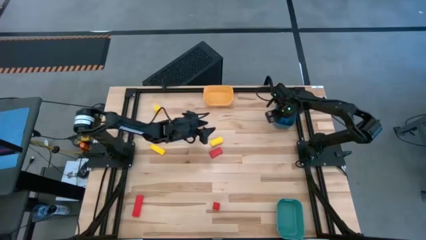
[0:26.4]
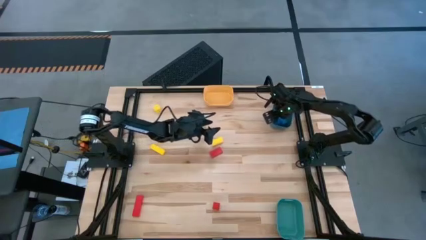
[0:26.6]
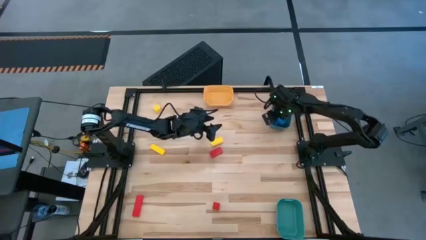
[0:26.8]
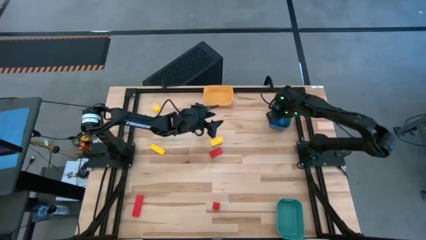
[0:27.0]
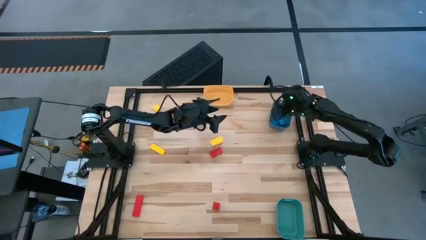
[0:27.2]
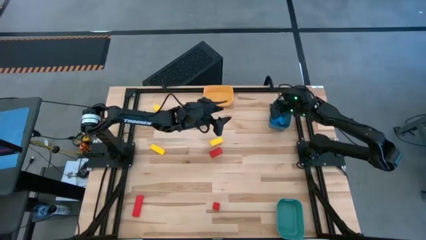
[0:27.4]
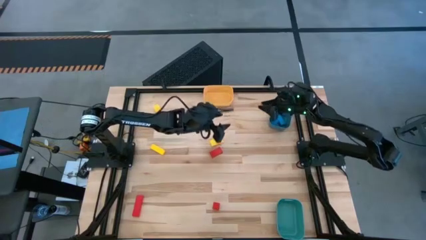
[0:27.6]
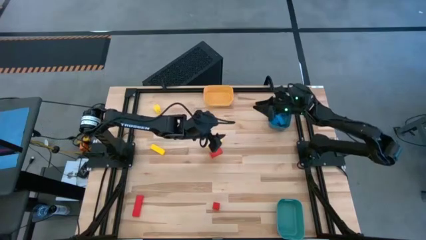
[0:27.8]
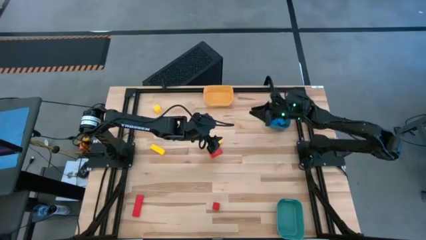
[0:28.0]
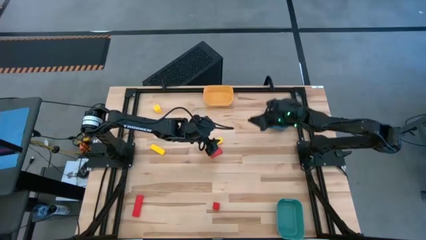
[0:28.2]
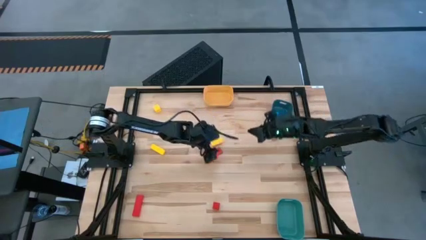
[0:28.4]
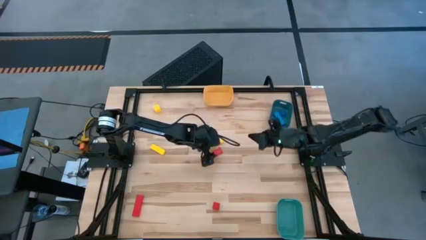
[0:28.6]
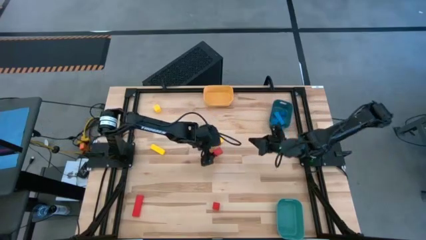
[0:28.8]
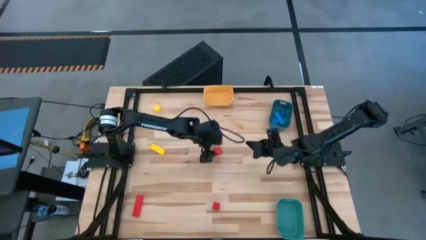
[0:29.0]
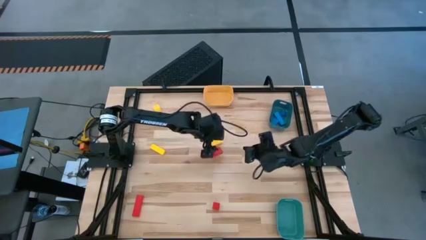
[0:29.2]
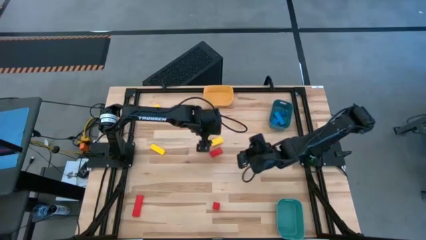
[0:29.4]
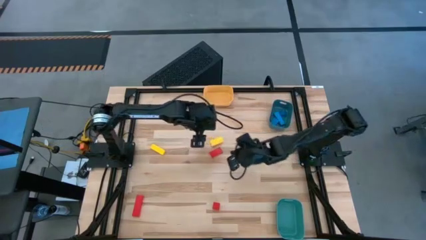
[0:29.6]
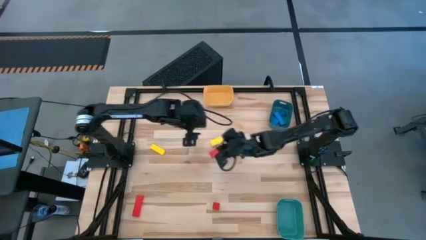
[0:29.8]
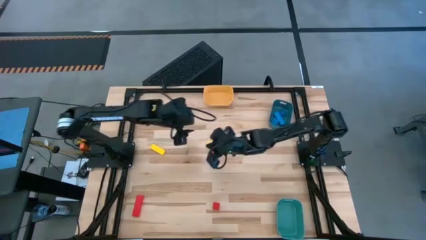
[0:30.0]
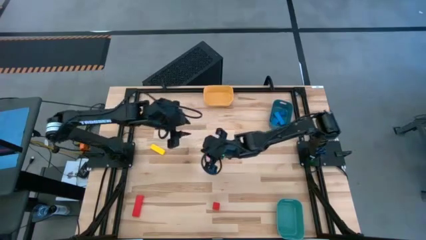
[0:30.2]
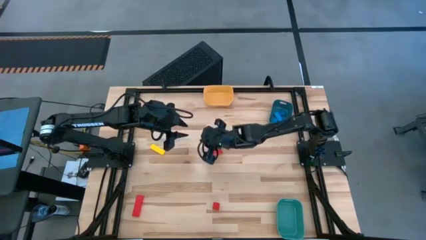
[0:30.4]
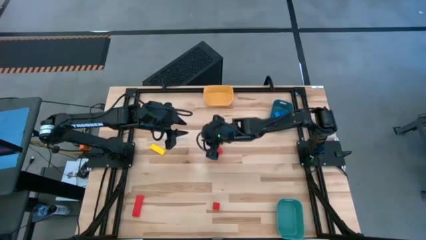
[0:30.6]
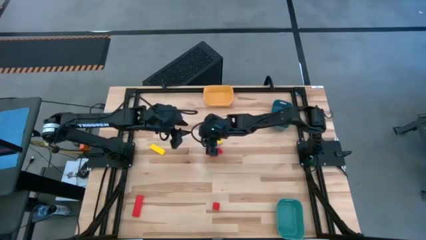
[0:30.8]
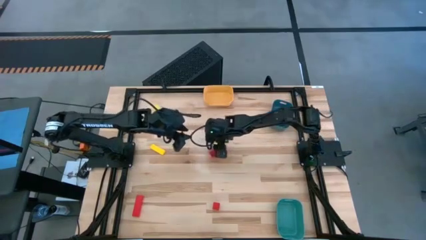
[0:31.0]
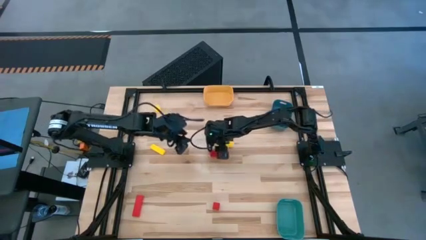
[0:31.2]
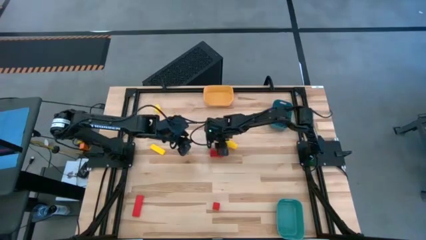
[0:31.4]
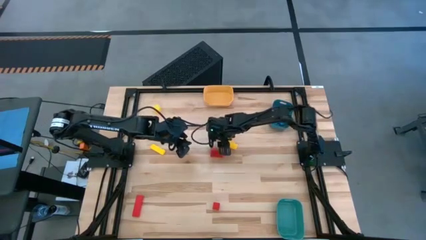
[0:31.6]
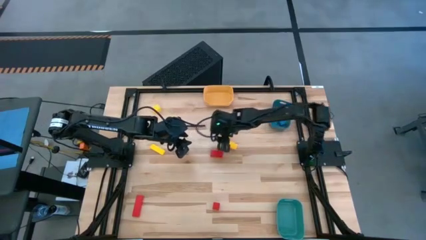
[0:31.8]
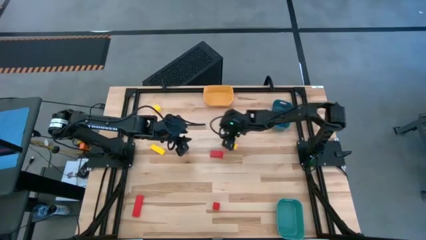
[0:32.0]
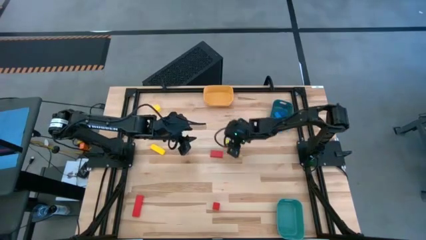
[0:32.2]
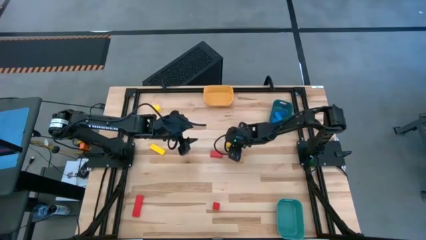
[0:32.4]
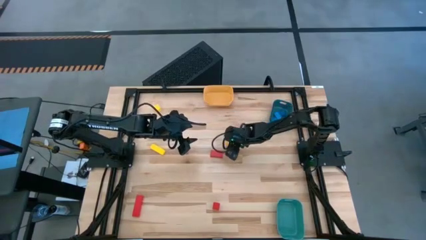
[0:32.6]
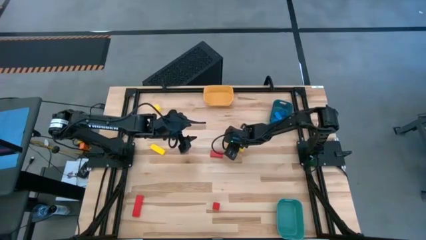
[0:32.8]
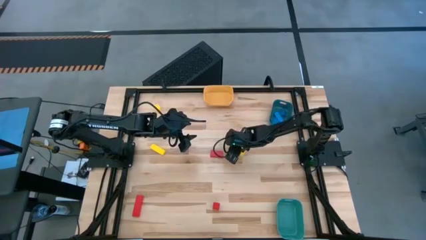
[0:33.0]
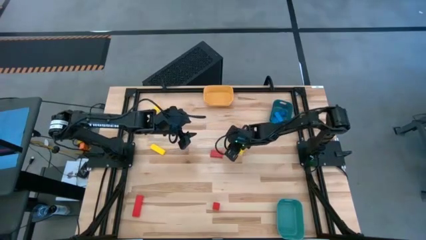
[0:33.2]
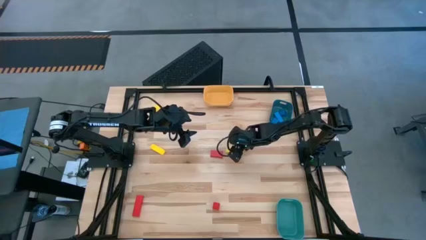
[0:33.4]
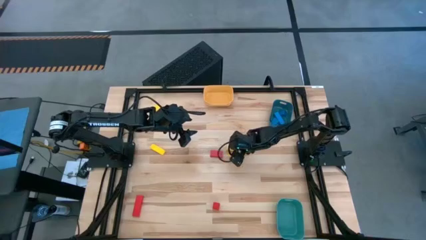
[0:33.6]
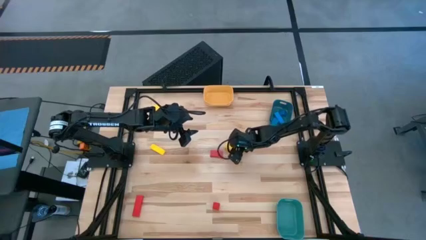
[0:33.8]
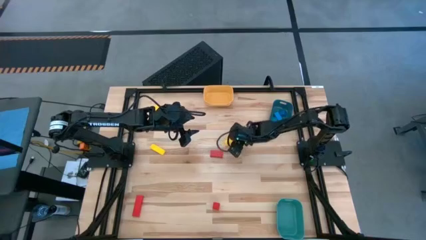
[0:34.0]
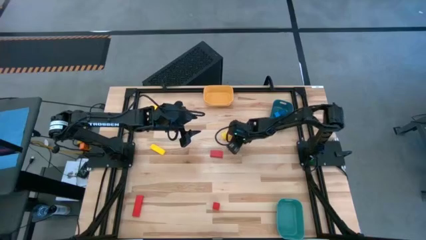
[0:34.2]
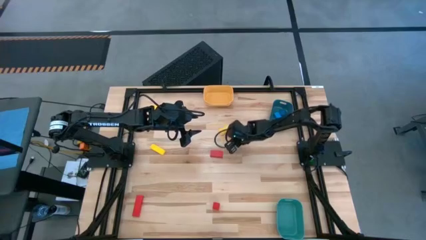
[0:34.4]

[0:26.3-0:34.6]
Task: Sort & place blocks by color
Put the right yellow block into the yellow bin

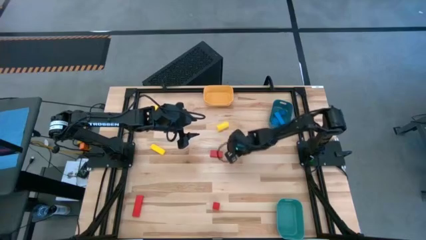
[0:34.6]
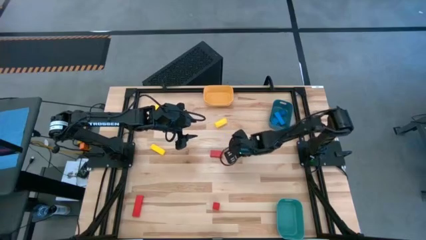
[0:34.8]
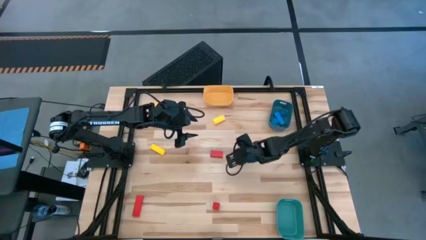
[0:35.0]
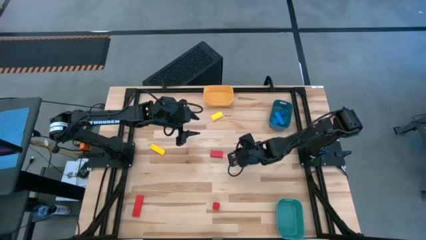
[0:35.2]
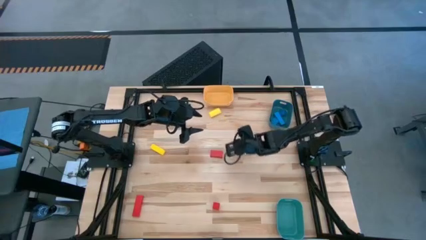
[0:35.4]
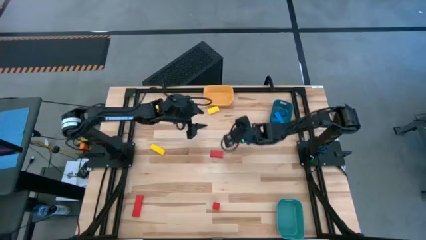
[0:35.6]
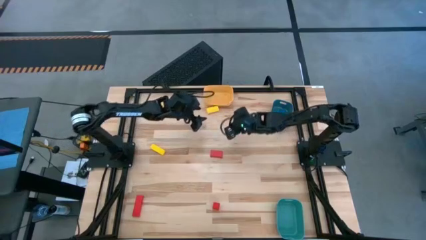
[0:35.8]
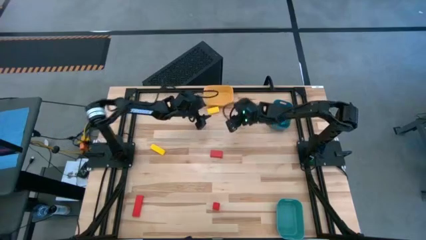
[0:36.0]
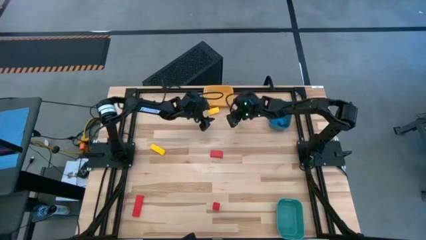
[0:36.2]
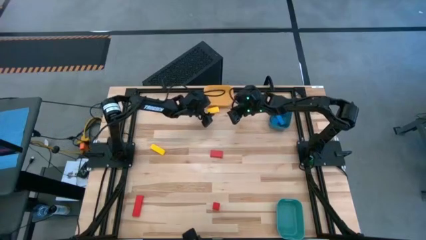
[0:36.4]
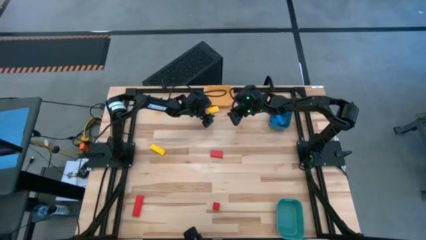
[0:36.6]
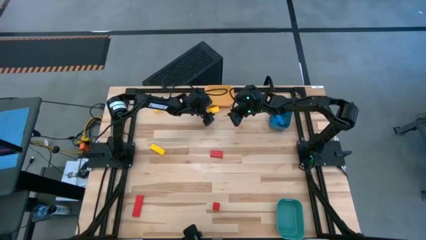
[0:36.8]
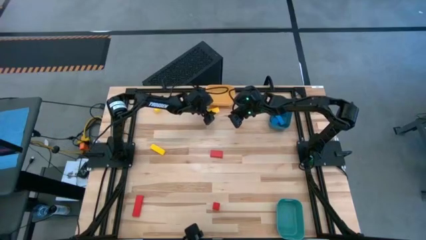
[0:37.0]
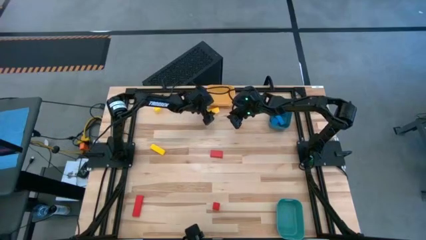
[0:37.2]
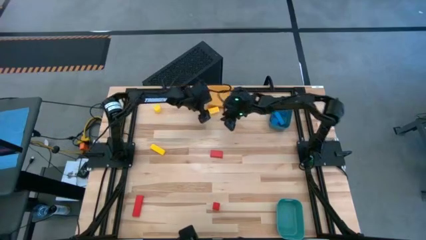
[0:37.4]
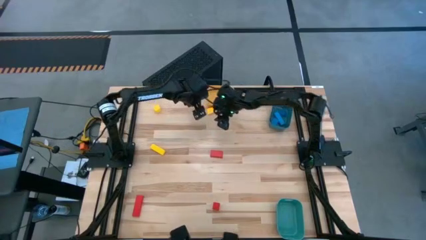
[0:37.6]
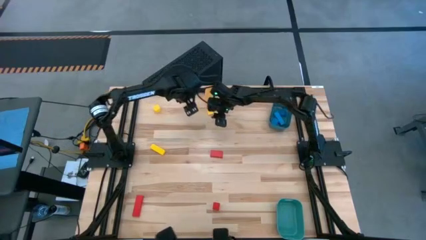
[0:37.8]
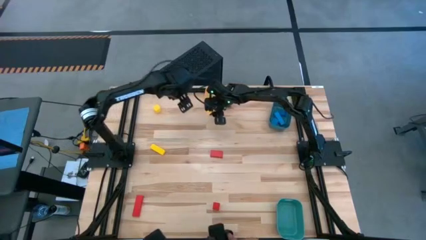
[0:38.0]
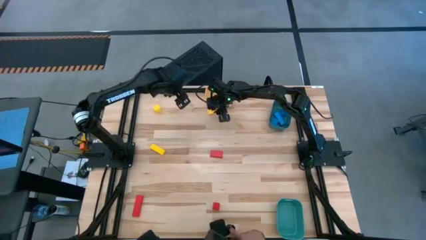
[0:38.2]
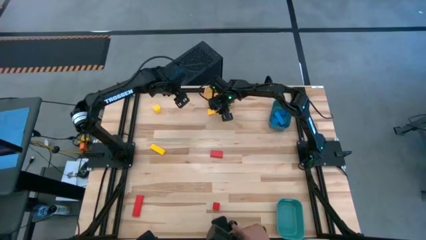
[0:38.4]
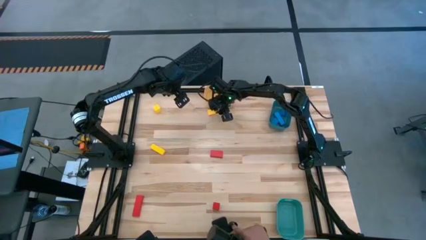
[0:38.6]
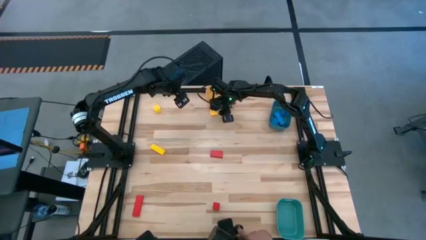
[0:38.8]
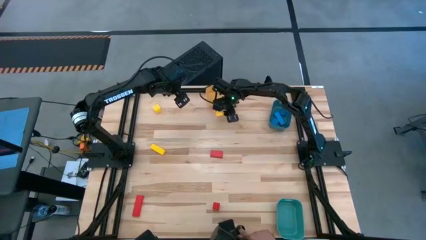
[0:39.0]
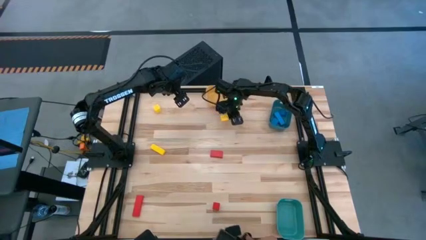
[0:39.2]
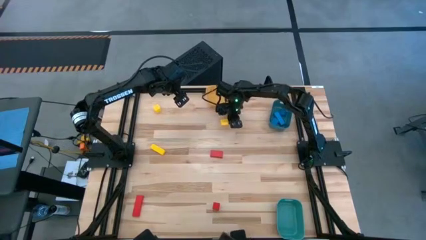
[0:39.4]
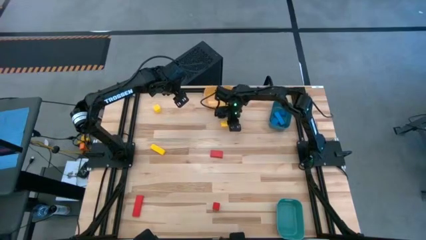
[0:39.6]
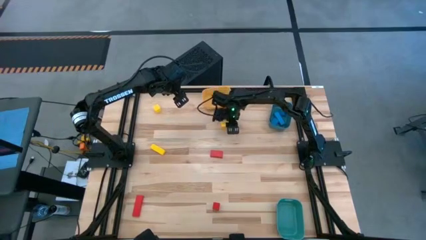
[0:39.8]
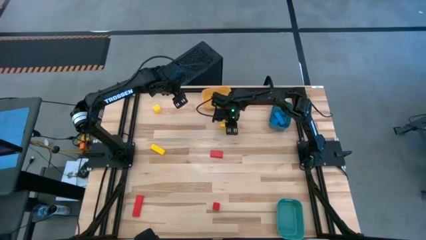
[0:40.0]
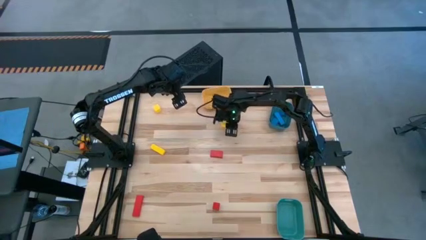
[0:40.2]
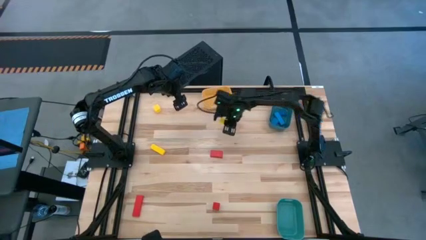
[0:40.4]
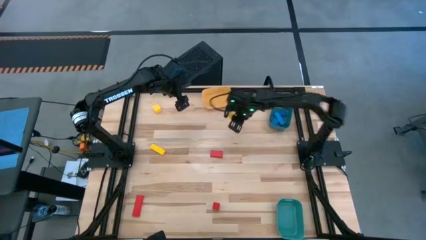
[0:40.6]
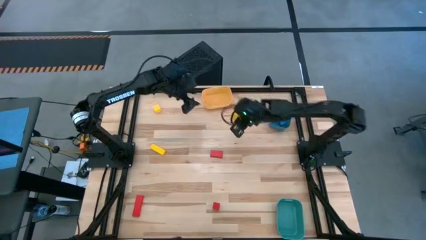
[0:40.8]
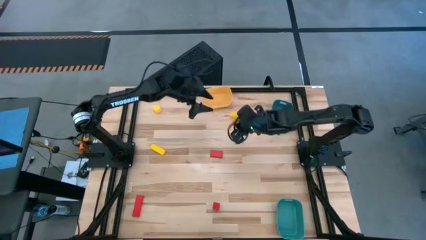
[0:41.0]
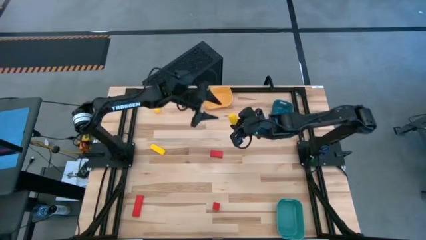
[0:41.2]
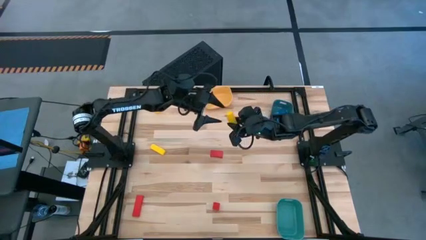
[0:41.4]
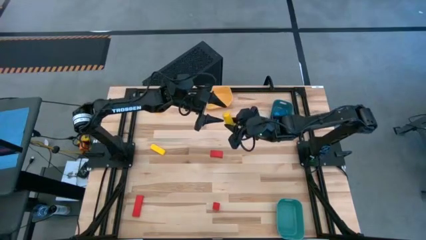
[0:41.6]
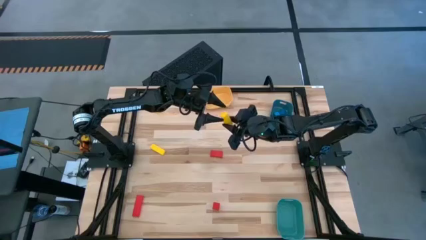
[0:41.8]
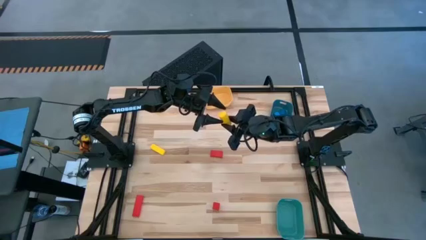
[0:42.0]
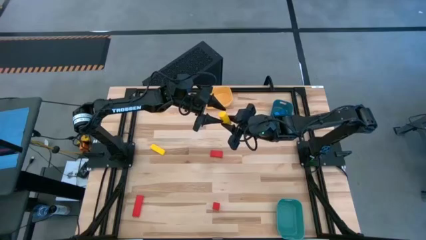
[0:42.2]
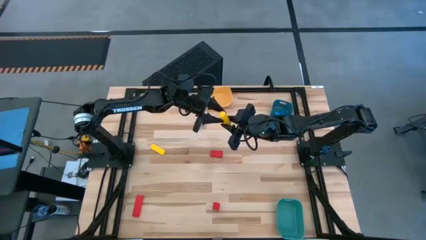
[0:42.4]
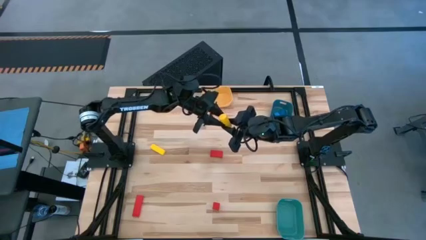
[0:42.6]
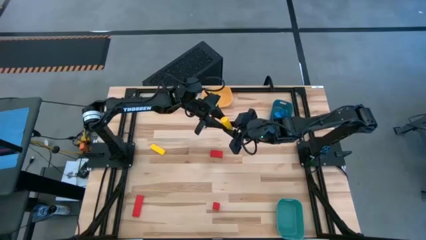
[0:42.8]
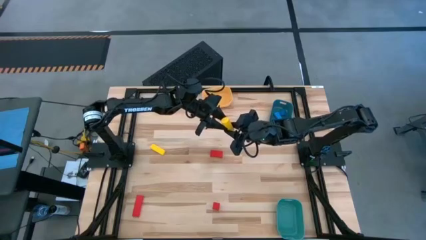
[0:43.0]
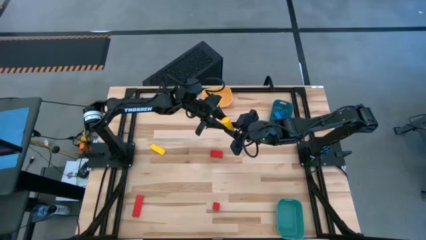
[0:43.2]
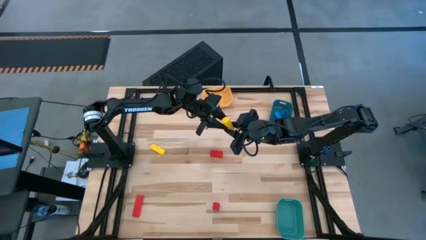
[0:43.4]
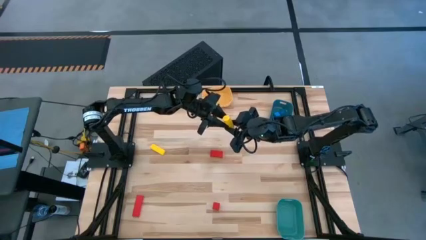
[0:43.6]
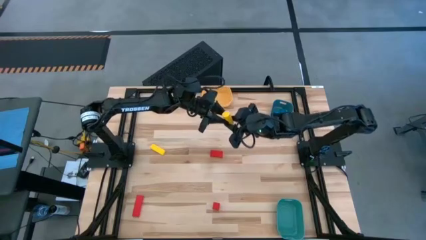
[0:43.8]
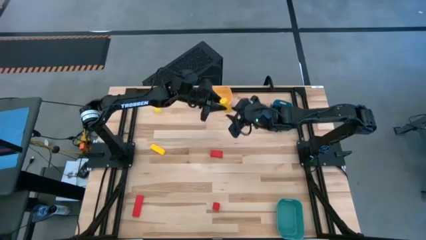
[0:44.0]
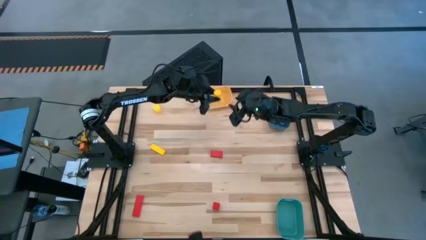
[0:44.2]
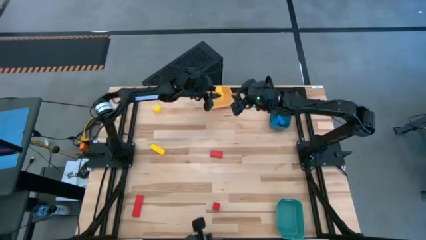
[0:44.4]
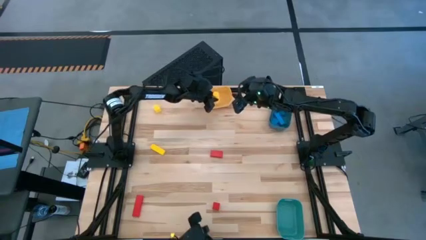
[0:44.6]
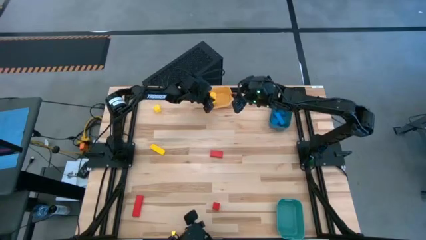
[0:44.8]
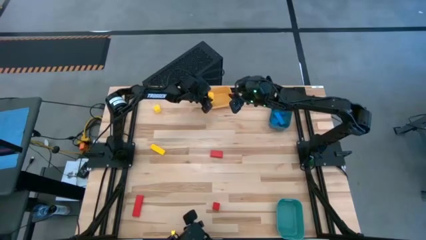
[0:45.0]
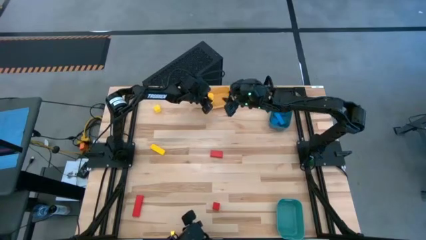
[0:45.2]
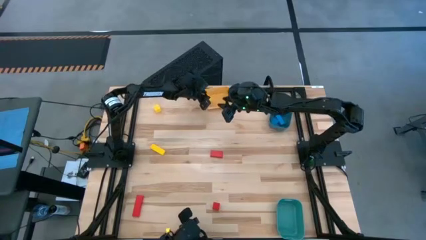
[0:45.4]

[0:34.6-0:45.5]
Put the right yellow block into the yellow bin
